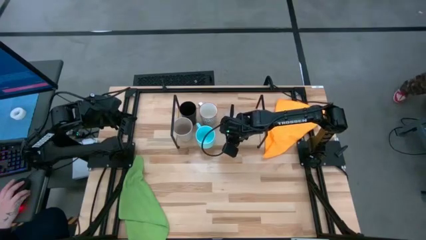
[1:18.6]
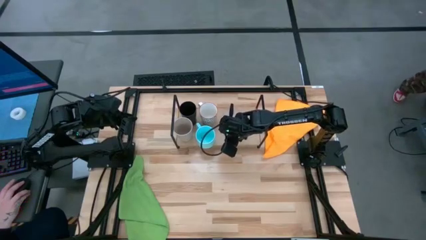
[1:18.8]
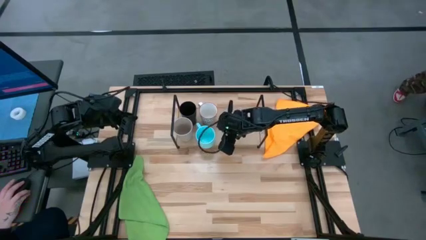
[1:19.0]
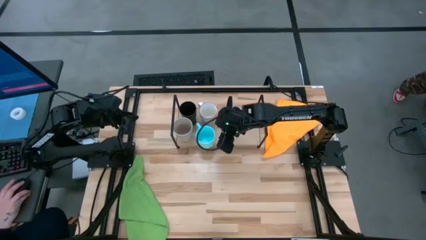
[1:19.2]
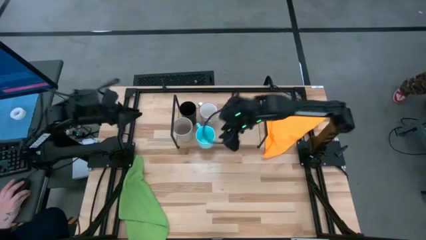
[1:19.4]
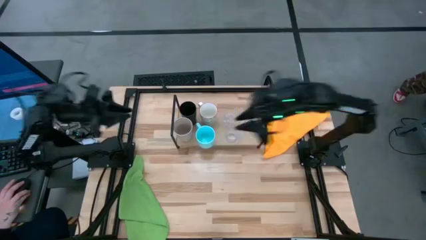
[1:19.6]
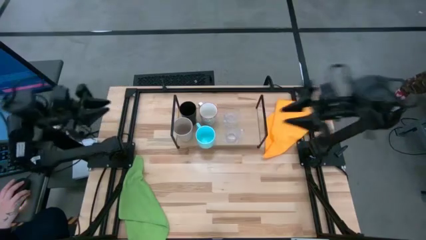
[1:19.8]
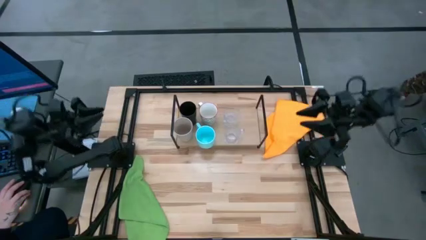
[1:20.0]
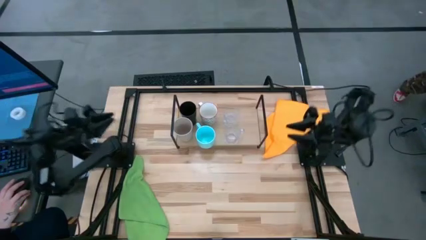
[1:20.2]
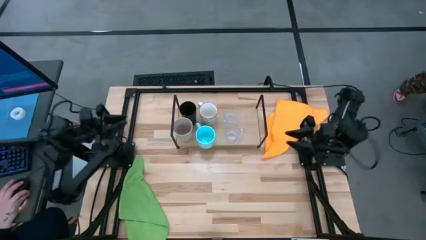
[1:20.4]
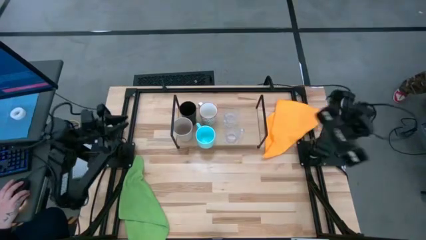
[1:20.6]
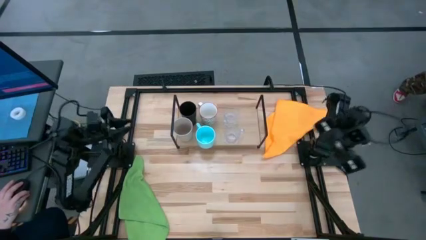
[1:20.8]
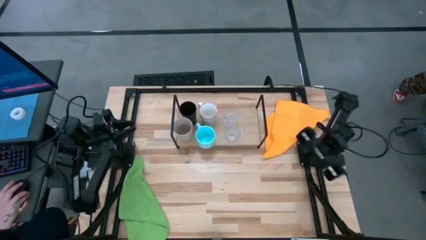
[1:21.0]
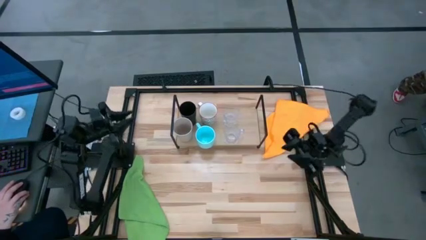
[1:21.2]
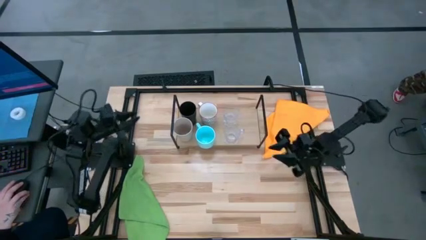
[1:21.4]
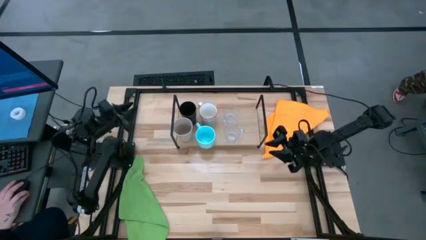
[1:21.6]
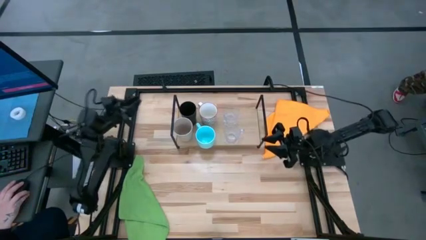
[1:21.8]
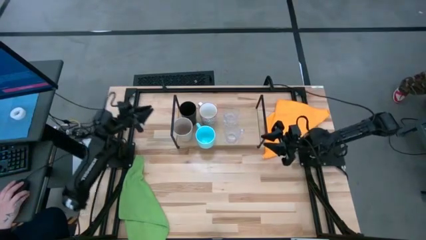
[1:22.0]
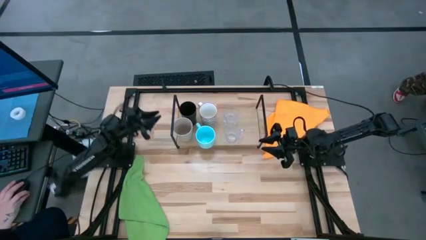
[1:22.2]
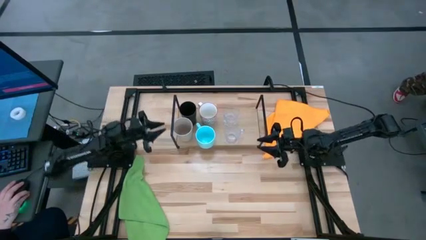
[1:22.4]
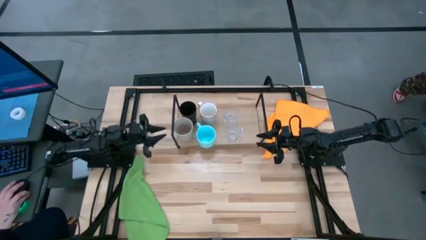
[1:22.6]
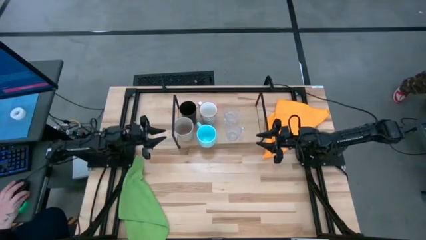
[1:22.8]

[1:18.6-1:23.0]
Task: Stack small to large cups/mugs on shelf
Return to Home Position

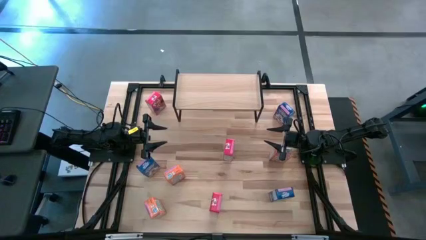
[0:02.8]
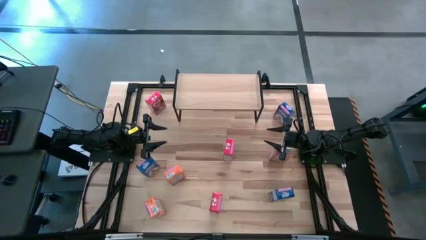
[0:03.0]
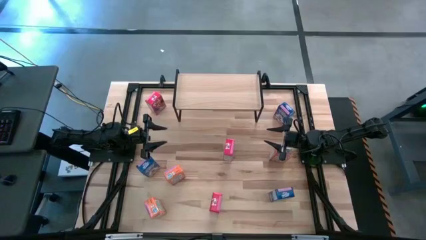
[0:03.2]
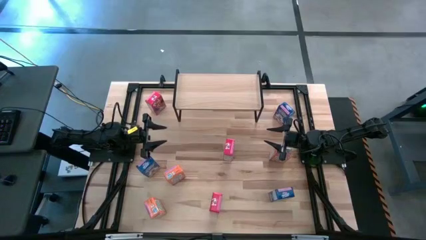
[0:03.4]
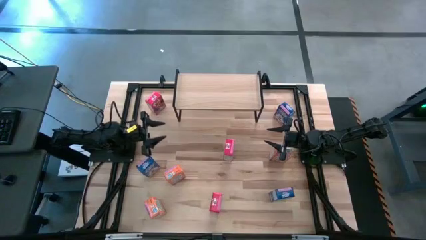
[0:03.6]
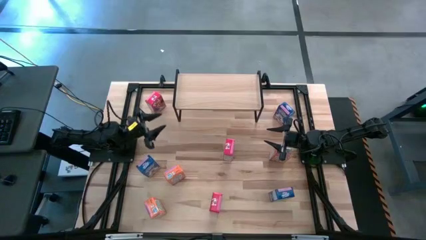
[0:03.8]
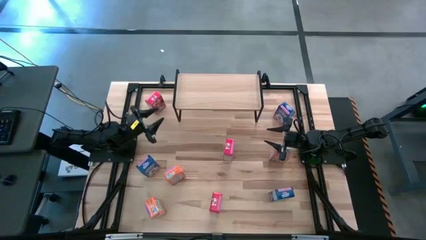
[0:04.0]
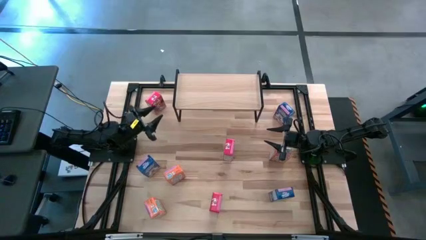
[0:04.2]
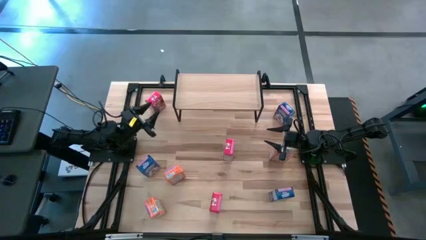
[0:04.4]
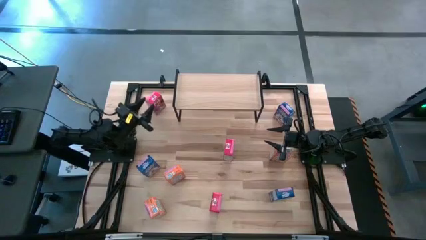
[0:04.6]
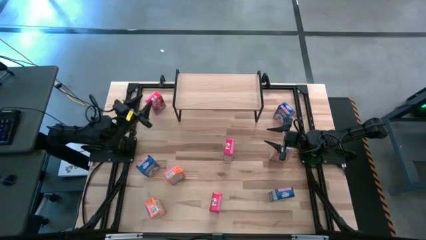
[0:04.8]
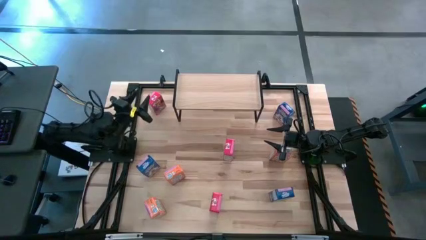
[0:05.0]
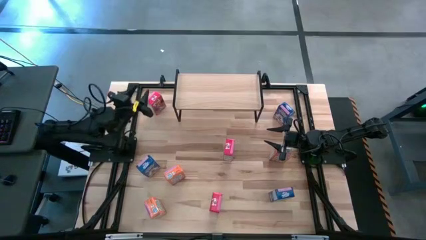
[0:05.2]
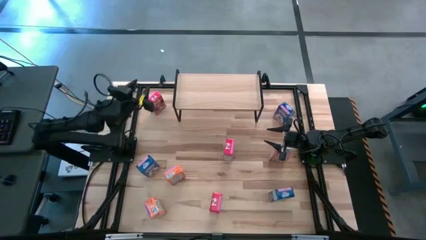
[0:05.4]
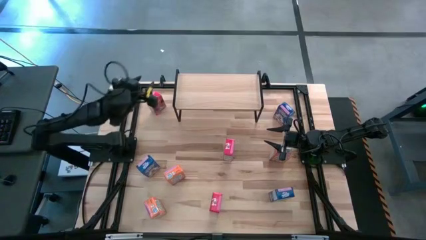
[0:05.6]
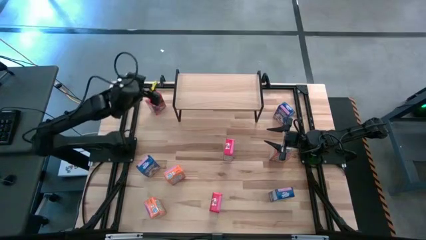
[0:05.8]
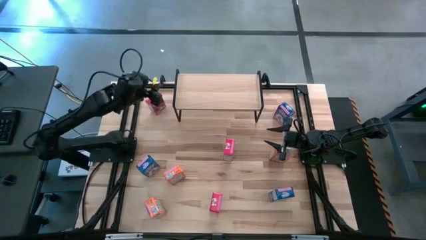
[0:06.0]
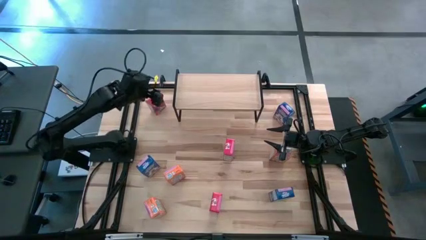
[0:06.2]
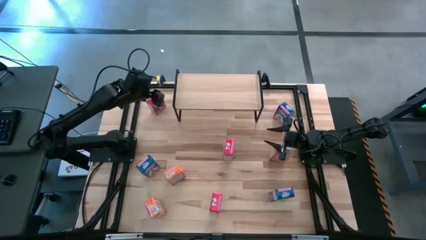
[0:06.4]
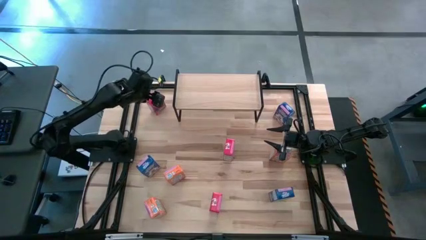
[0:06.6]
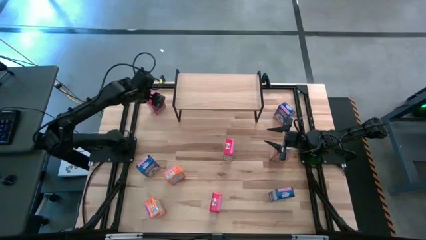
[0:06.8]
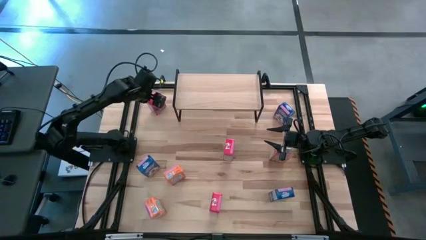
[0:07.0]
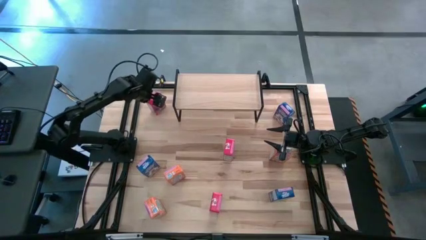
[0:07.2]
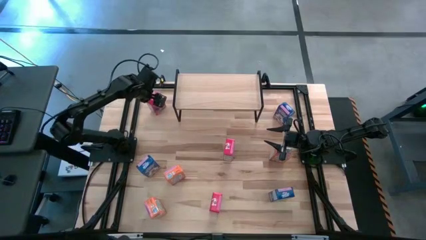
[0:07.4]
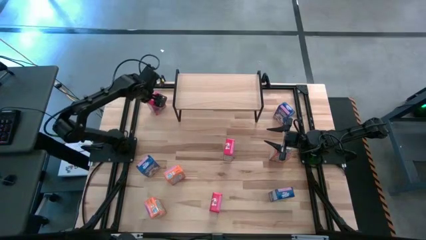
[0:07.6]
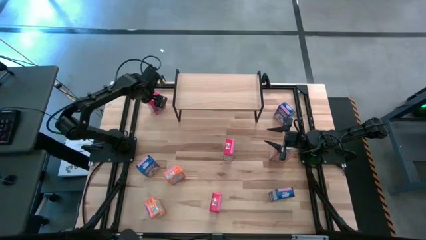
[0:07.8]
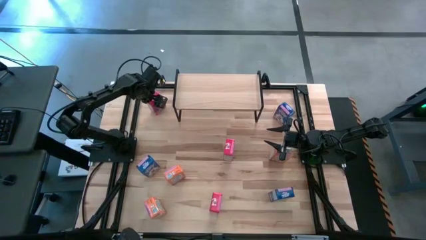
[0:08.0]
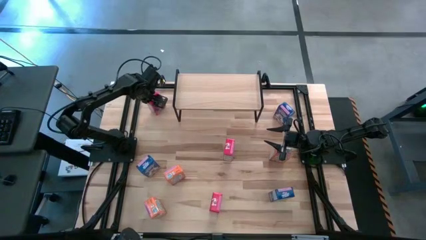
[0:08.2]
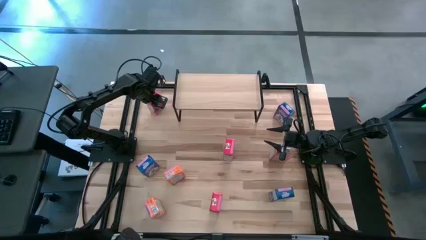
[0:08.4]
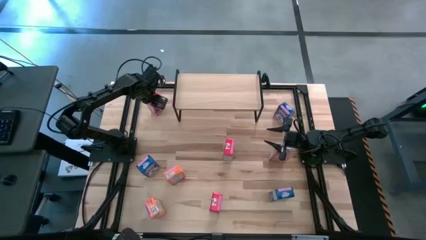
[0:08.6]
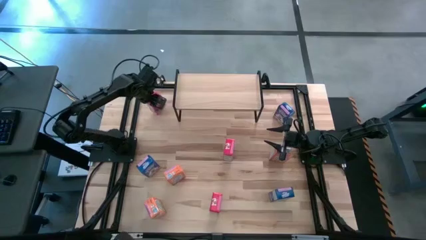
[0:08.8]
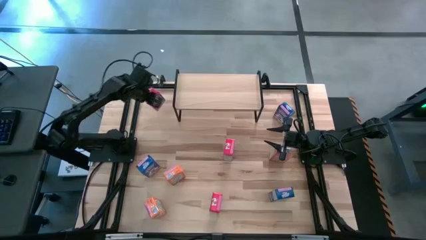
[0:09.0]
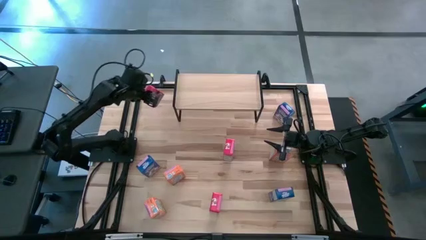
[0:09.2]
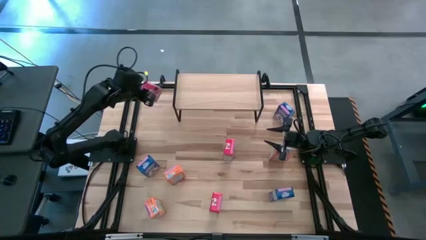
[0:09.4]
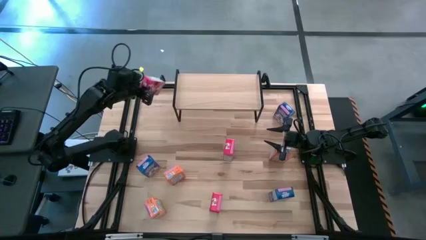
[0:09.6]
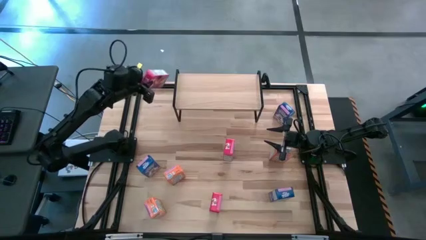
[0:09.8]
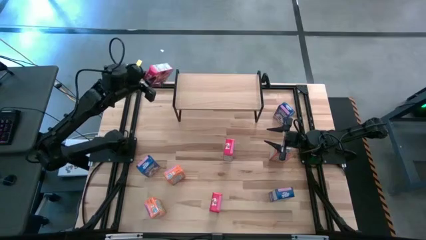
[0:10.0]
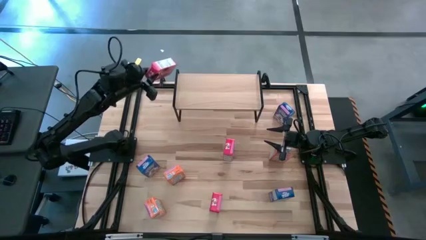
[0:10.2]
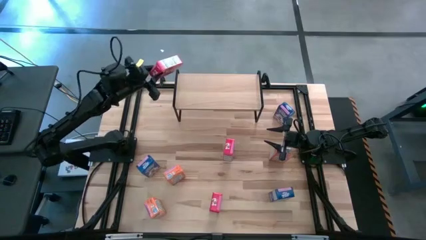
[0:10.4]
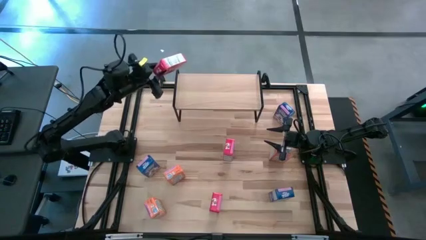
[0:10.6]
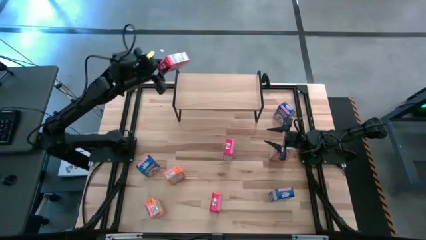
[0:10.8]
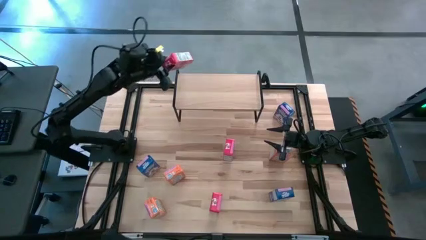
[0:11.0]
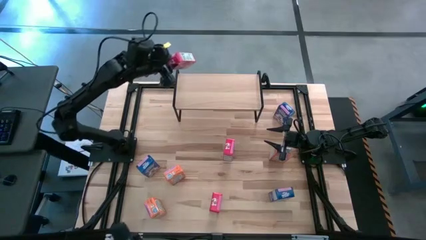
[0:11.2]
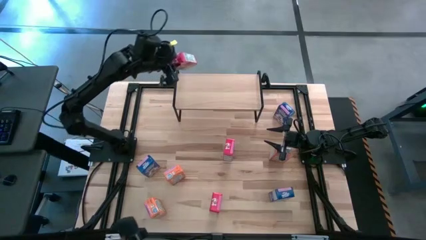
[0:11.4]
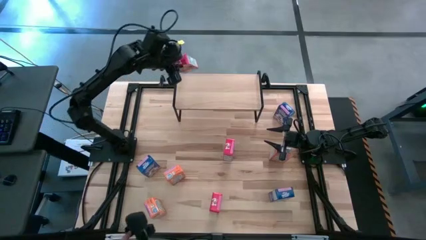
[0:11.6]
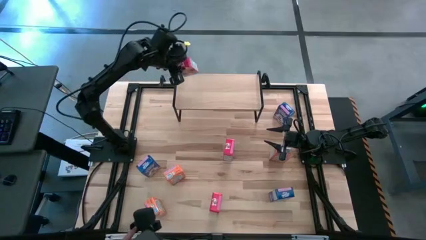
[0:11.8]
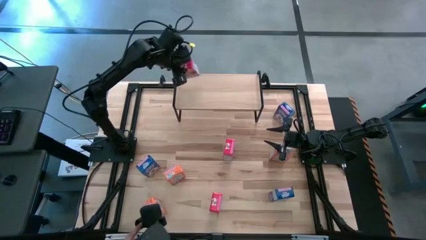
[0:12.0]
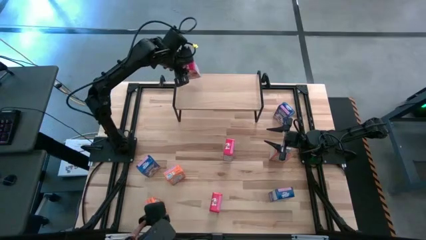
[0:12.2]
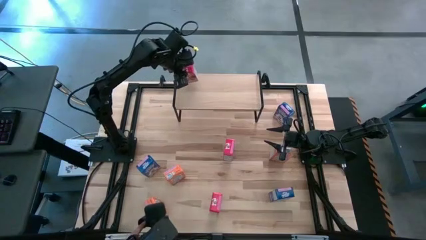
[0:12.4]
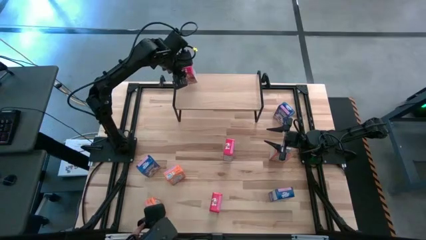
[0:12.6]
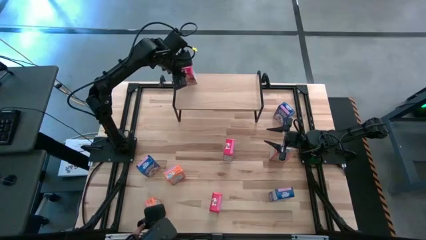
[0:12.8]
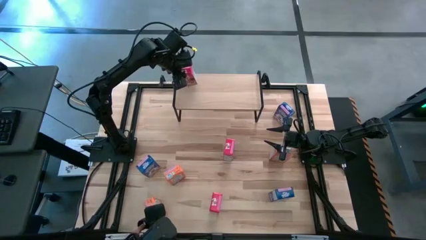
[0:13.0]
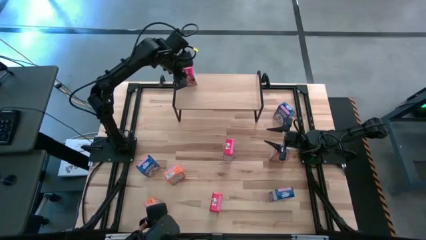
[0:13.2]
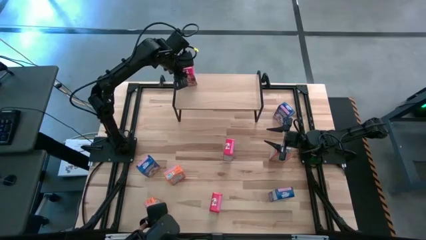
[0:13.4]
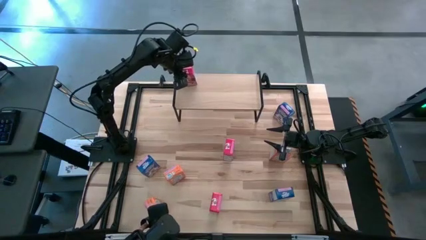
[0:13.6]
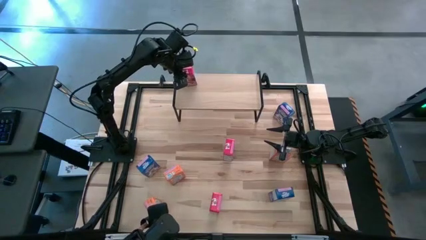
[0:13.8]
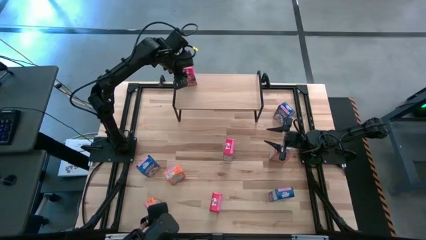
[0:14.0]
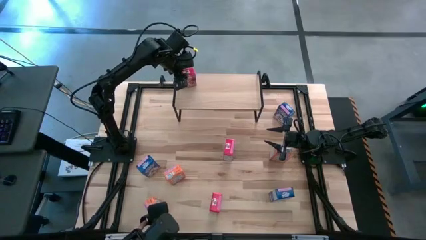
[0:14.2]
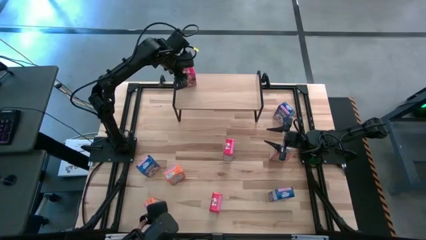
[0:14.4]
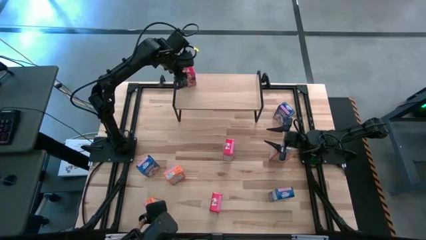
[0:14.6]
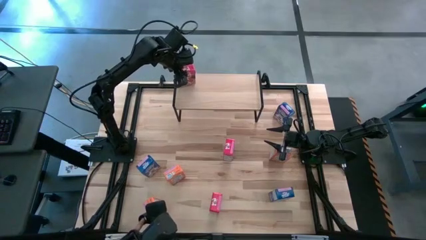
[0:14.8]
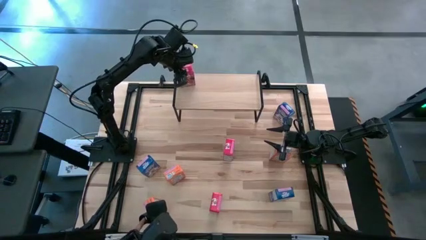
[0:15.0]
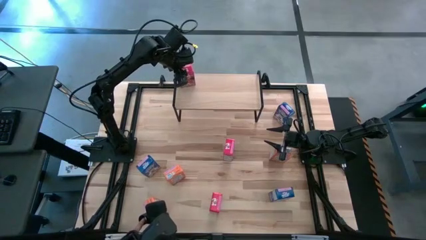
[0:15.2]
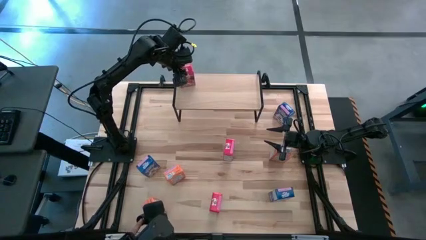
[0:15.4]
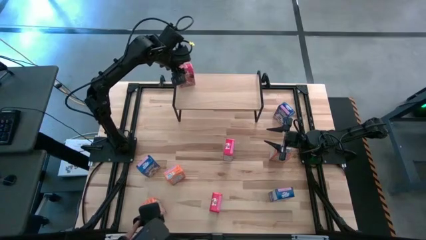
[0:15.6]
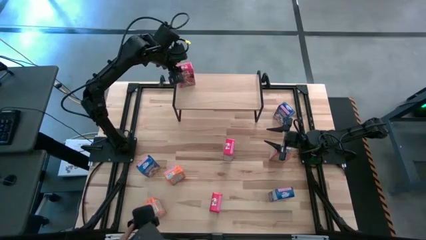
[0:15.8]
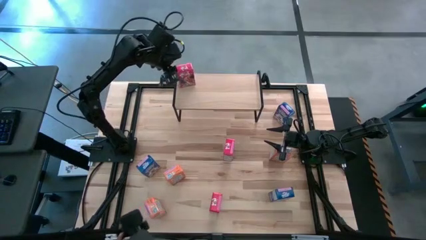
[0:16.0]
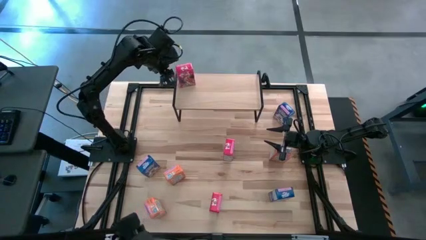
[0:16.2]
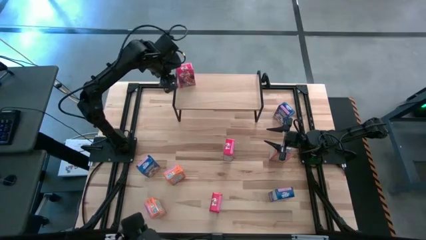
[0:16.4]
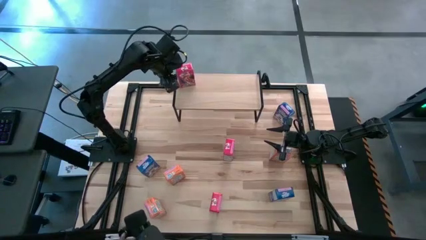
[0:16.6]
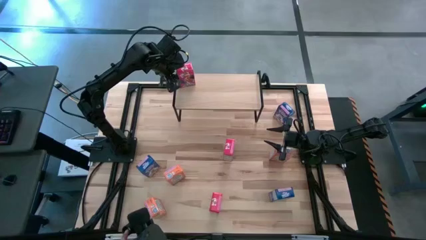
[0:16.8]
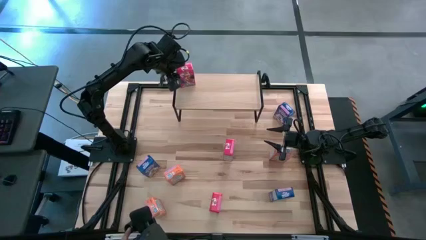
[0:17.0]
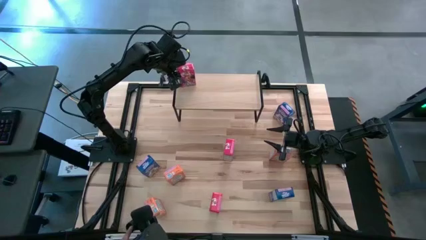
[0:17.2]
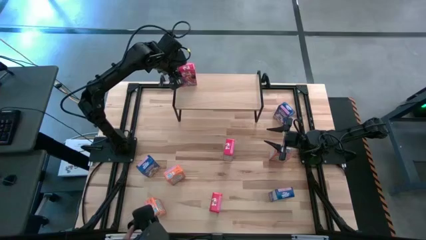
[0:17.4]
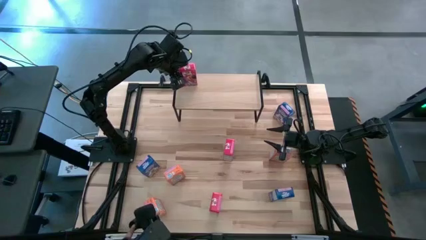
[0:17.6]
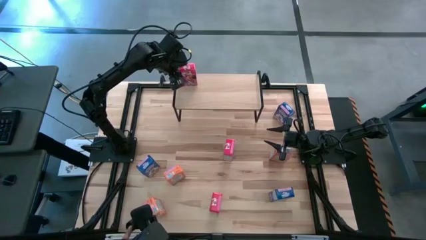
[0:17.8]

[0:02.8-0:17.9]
Task: Stack cereal on shelf
Put the top red cereal box on the shelf
